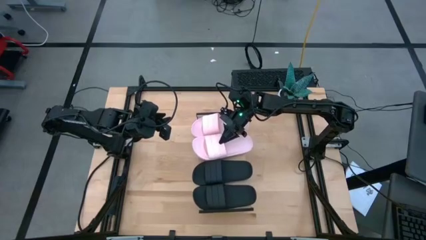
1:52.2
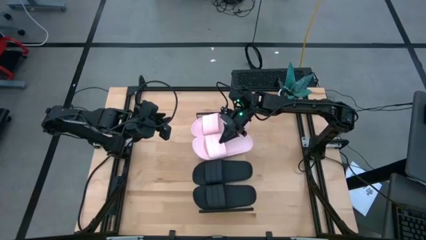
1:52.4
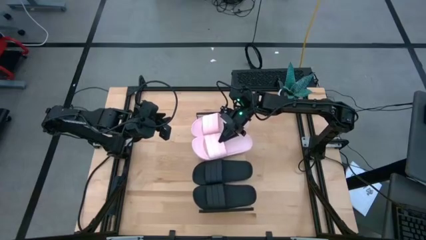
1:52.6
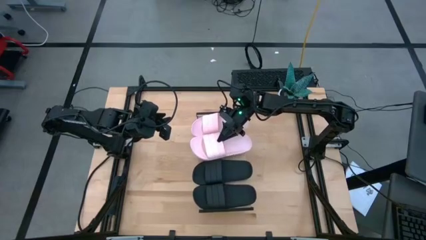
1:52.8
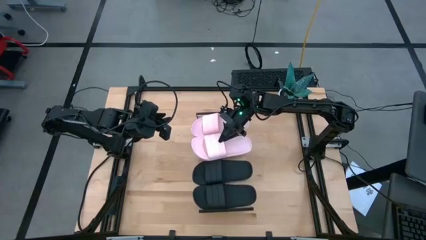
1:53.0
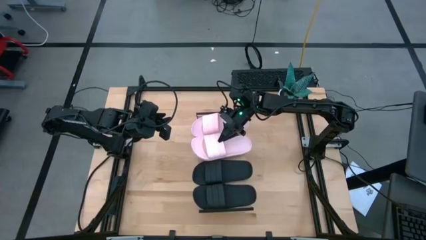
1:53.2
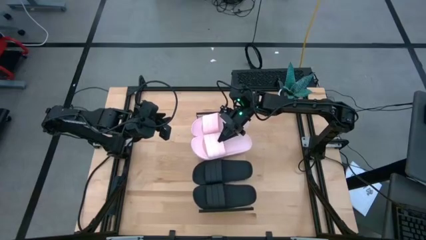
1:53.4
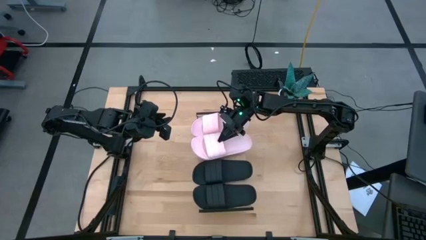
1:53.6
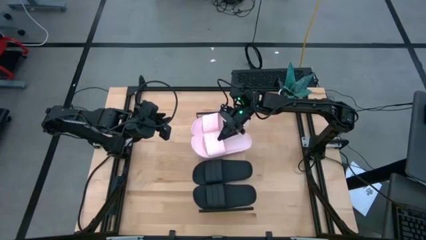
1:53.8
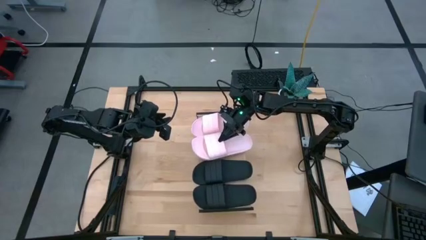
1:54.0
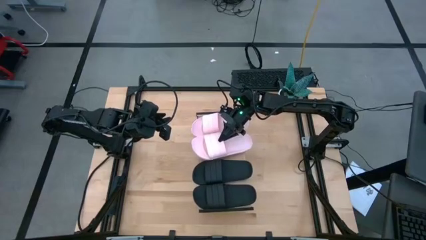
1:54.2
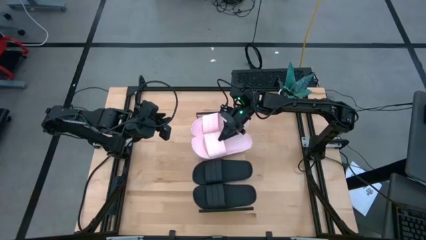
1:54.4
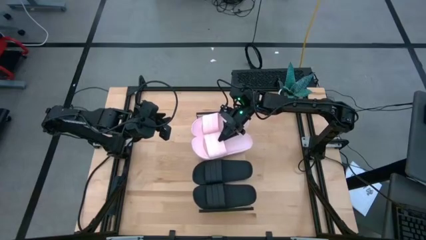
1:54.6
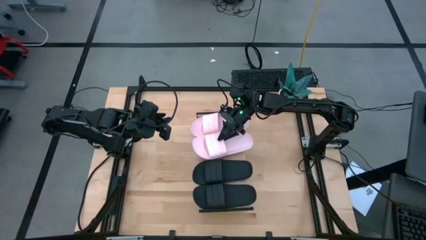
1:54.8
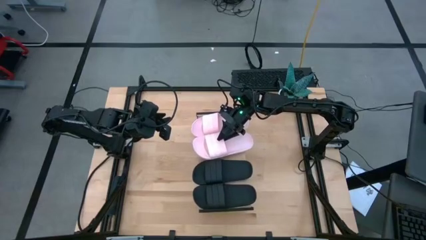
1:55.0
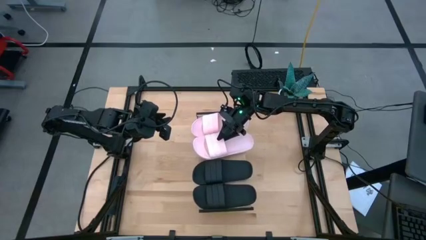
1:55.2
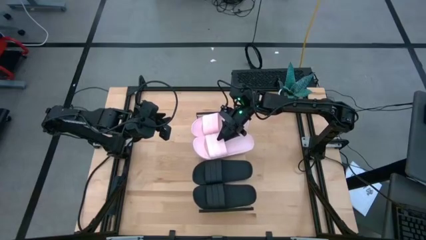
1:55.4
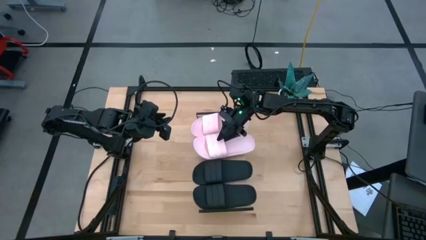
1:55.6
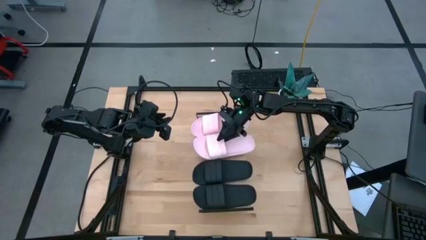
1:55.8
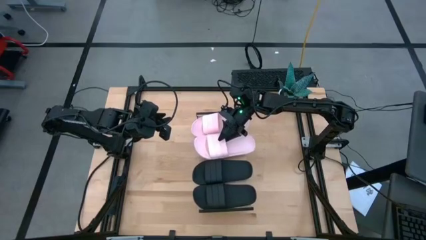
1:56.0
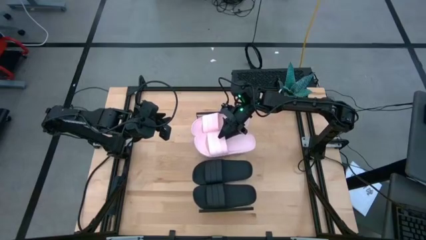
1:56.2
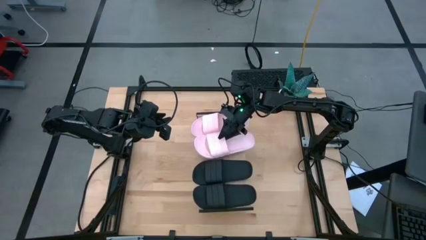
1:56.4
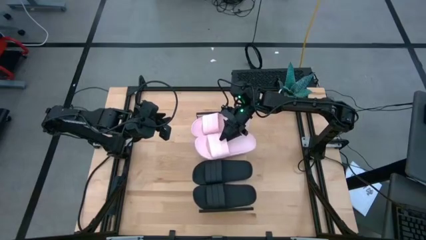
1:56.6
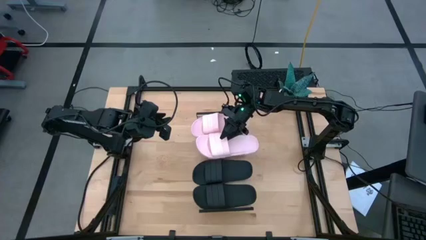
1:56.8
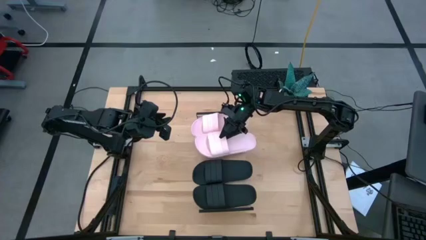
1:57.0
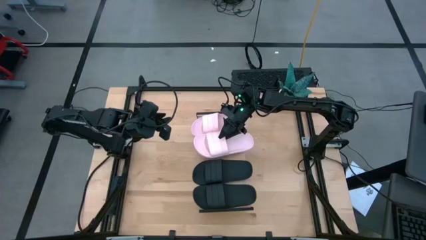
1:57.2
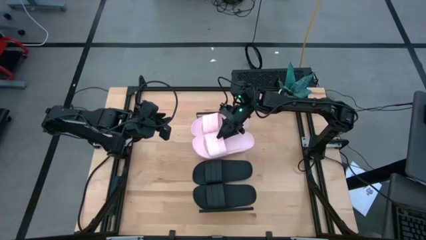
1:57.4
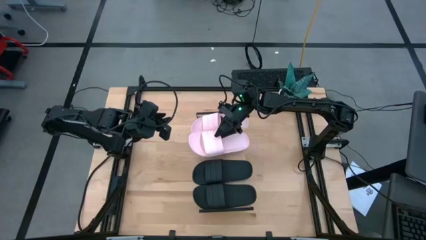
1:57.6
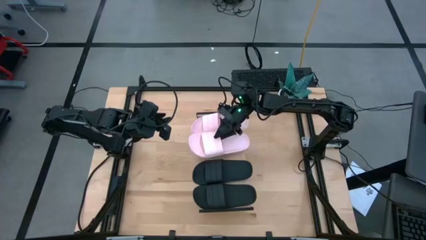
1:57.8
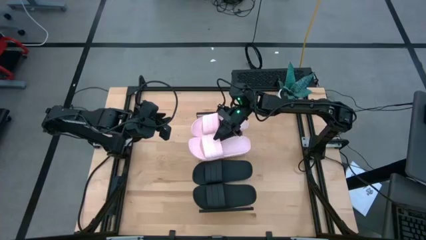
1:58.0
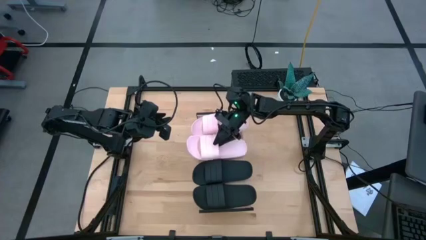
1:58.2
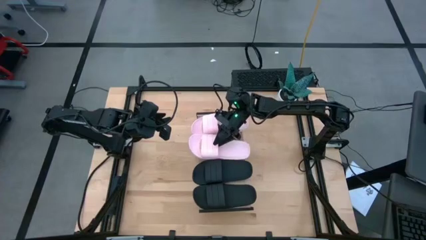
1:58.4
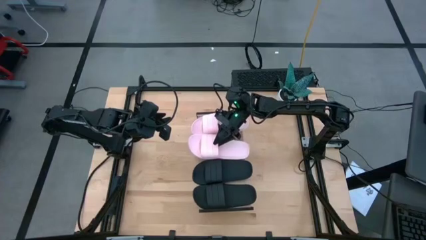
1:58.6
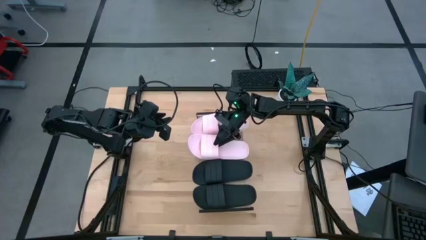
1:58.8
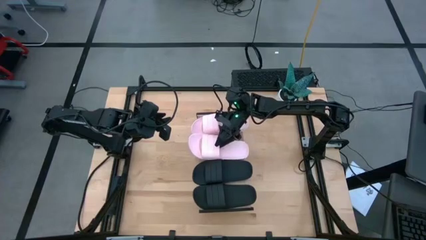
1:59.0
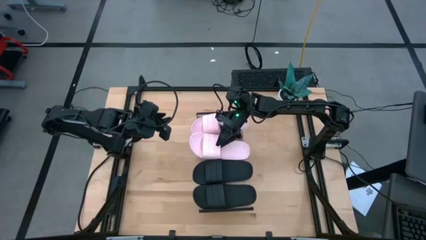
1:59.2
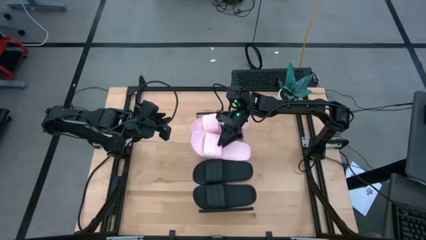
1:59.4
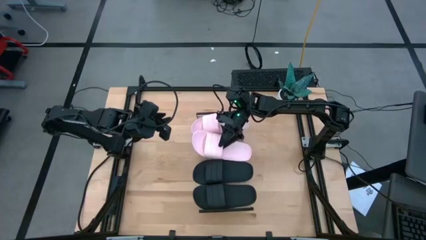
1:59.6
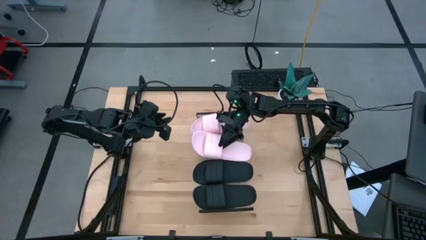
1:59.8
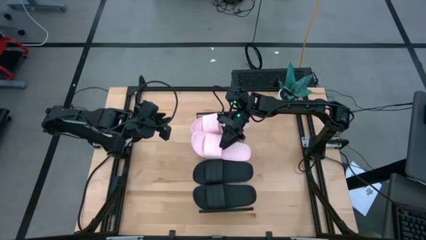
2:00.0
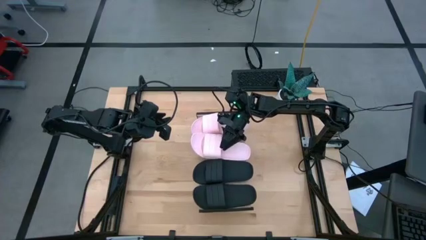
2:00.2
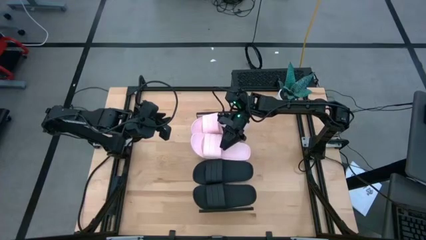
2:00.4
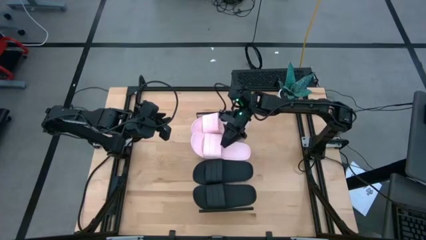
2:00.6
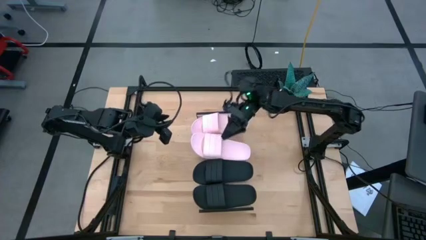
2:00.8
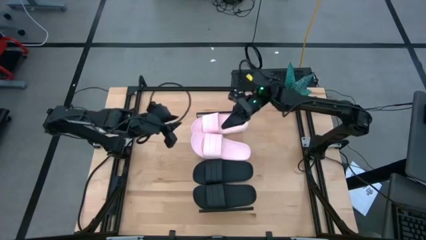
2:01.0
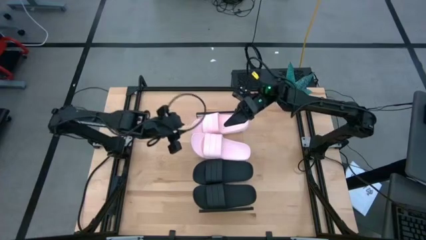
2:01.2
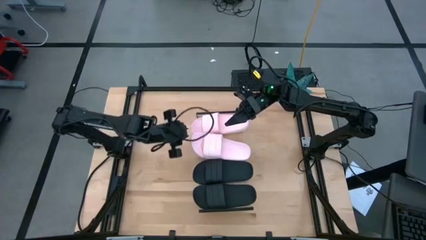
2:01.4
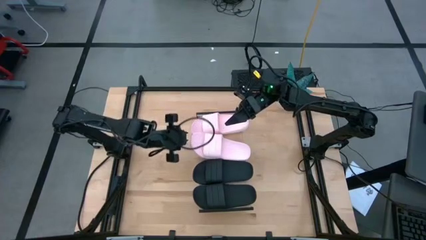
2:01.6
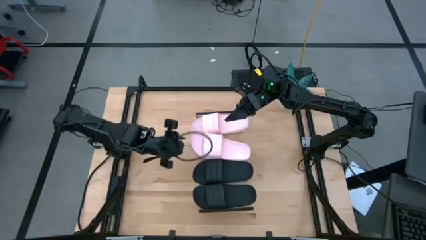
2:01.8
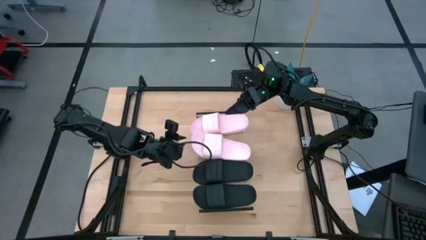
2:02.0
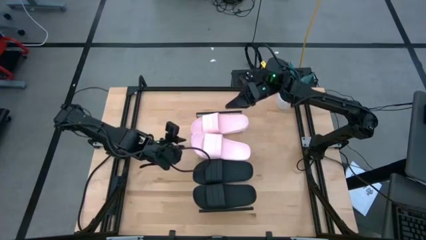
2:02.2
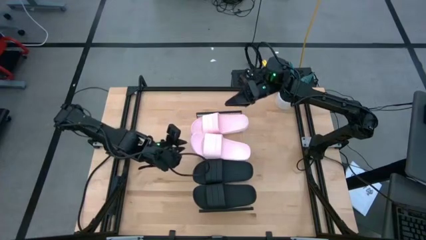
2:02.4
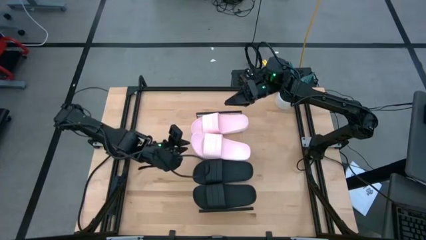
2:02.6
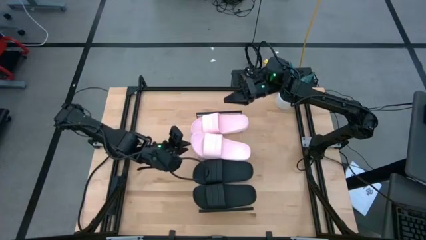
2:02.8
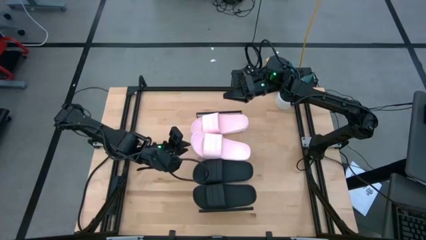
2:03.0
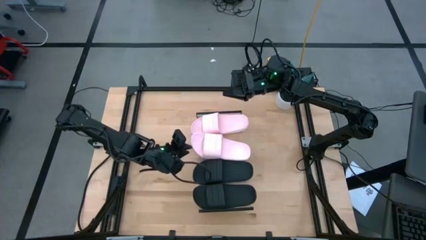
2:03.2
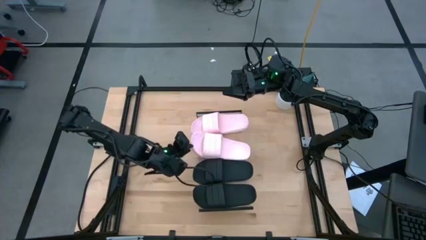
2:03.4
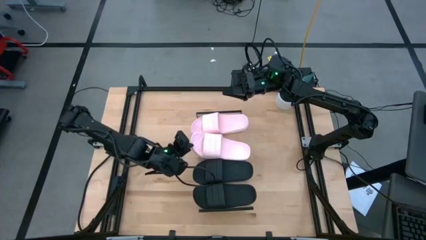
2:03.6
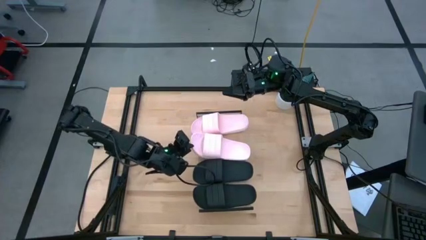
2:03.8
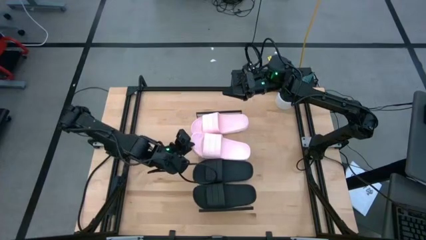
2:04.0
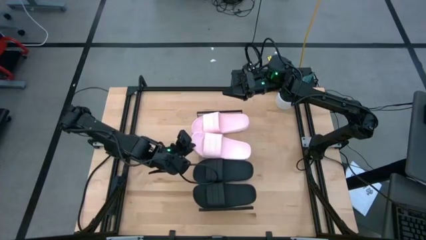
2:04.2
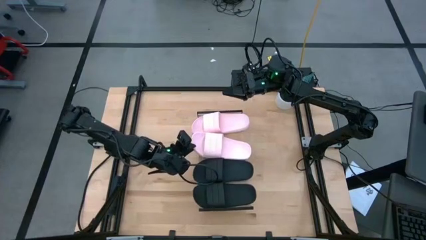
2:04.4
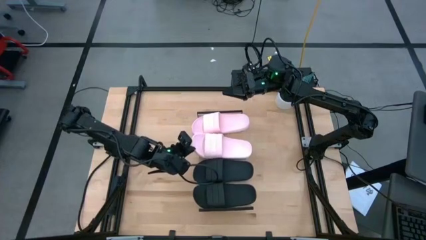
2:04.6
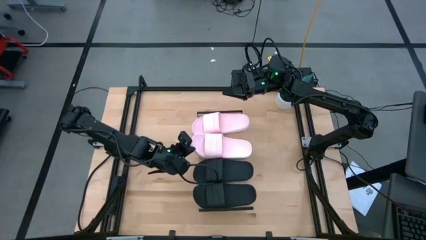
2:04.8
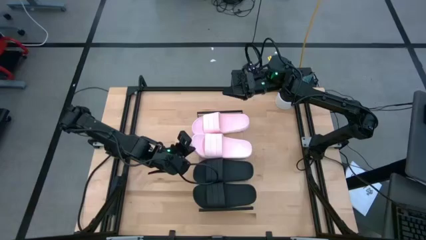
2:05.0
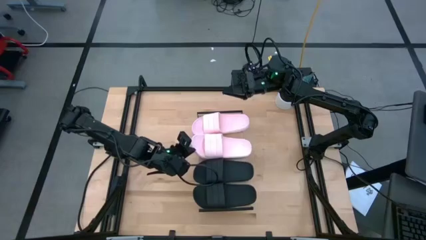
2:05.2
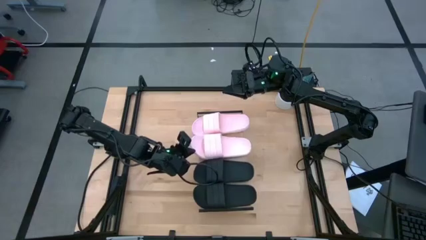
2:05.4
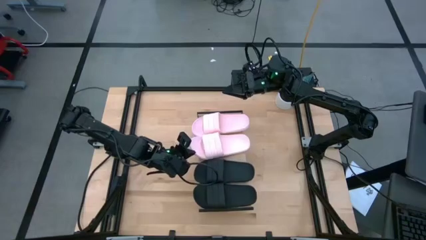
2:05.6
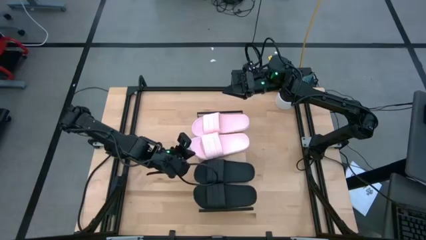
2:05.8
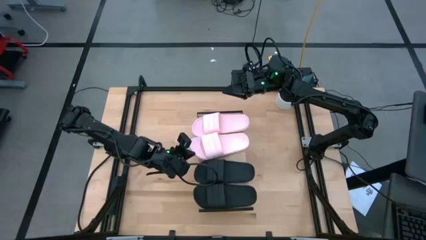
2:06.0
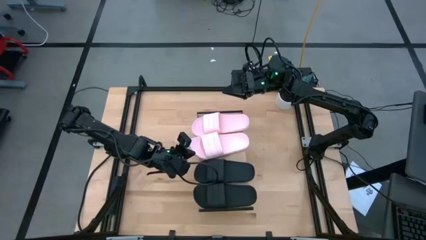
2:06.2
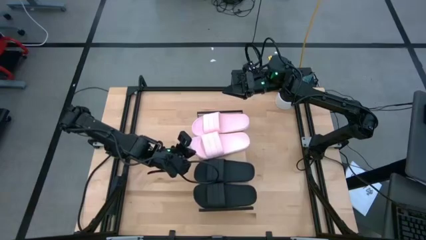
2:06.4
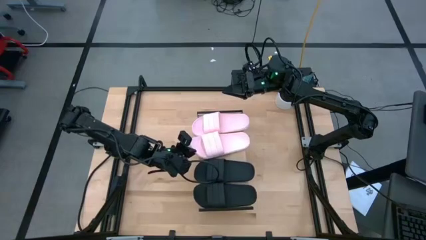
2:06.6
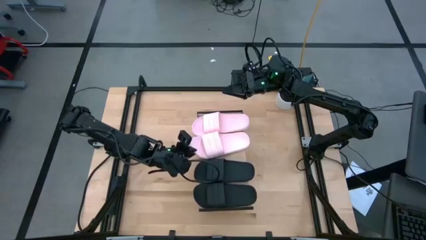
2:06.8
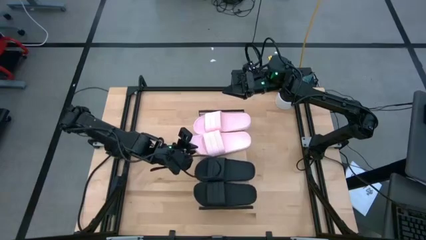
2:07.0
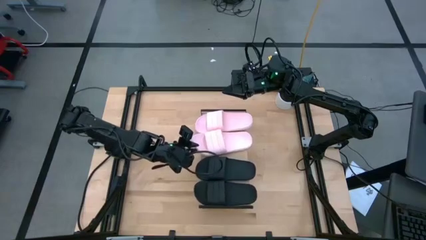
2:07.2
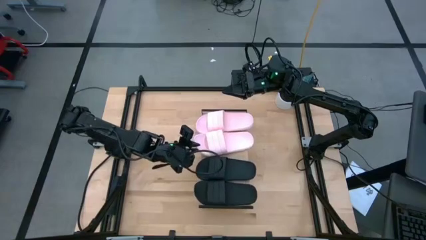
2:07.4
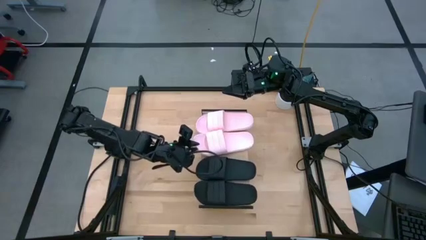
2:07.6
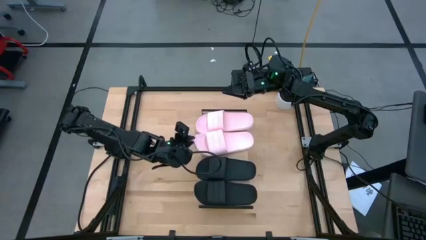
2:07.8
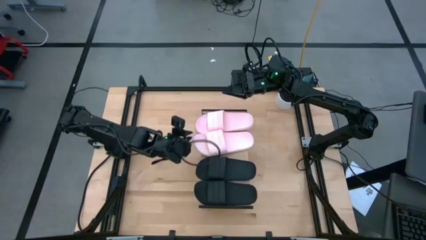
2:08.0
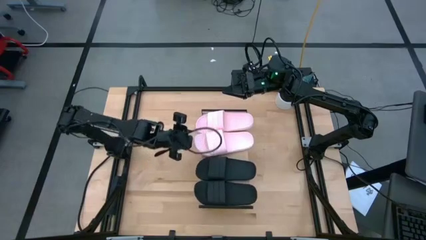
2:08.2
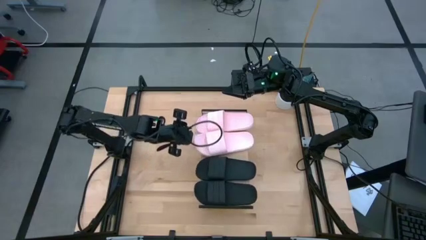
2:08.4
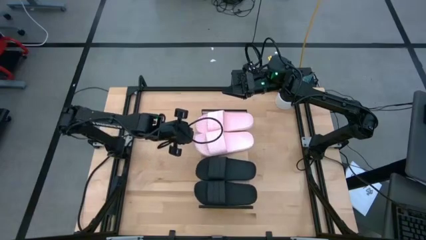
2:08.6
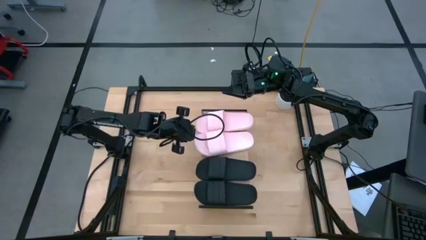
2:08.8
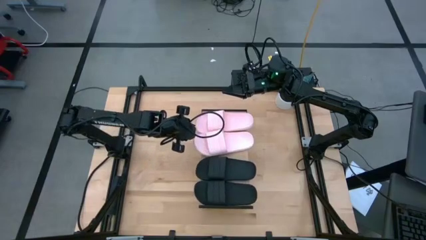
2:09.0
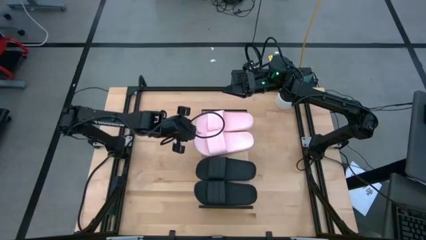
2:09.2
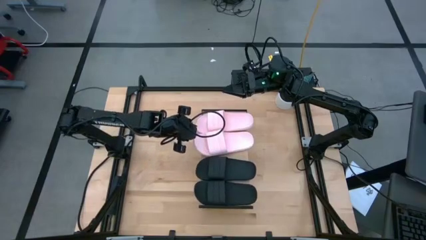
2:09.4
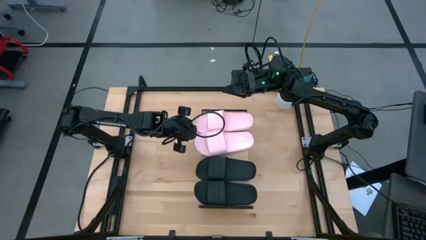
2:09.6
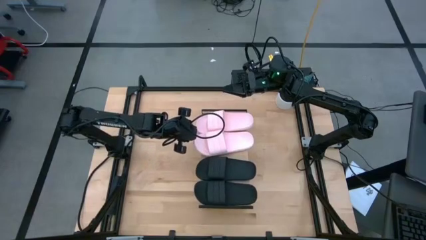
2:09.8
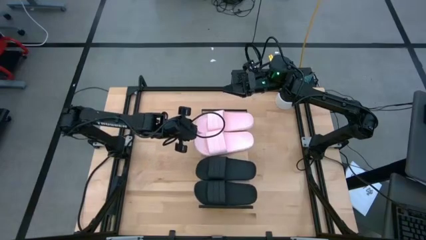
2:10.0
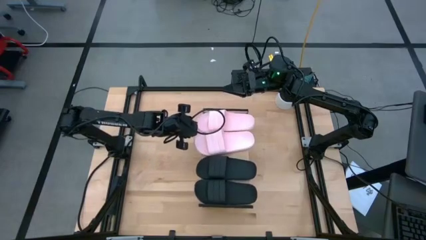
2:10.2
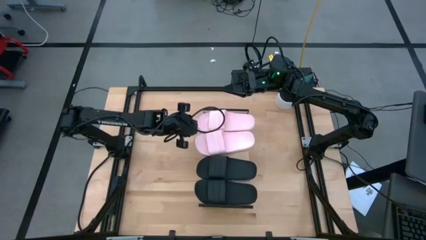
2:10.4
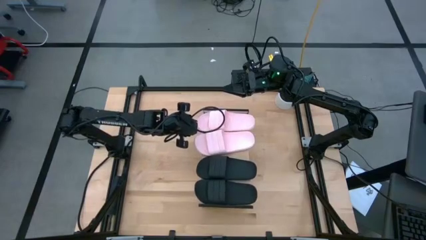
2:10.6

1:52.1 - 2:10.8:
Task: Pick and place slides into the shelf
Put the pink slides on the shelf
